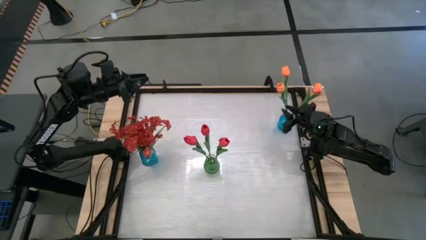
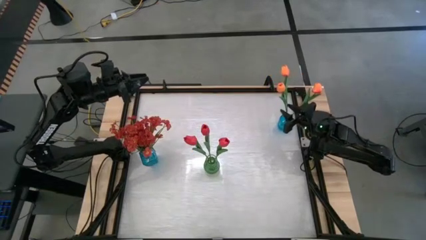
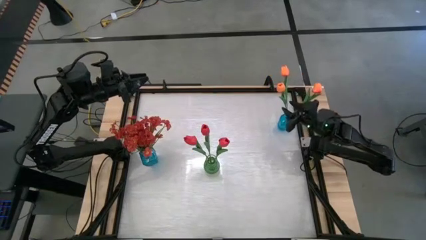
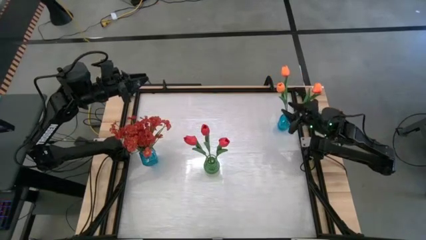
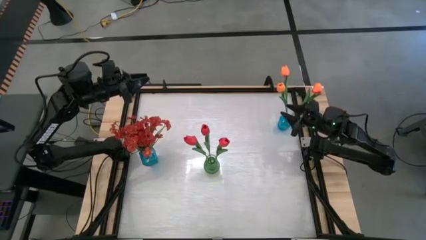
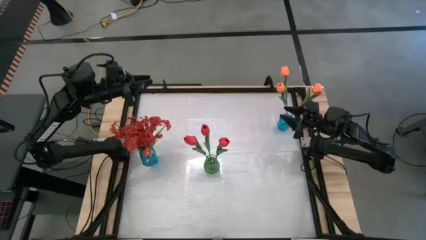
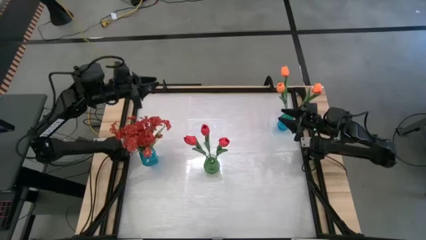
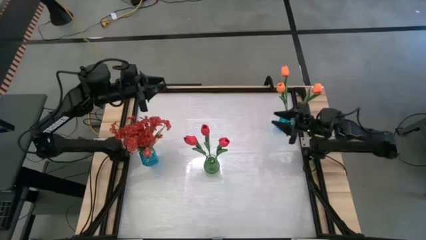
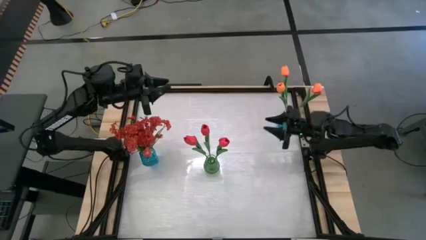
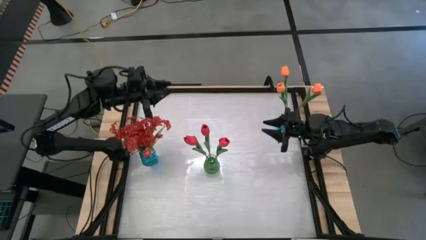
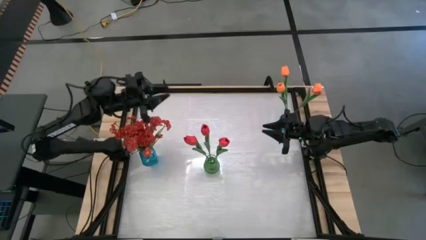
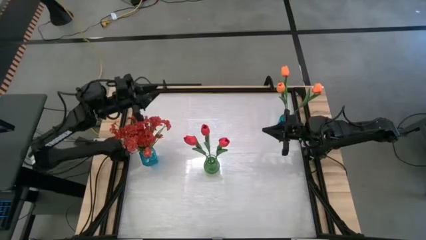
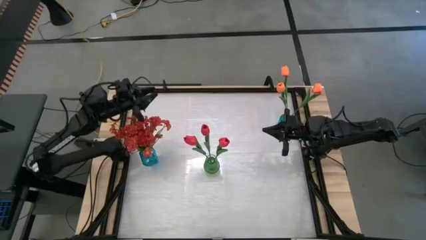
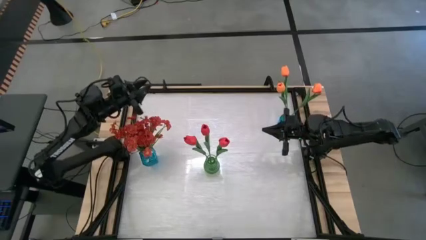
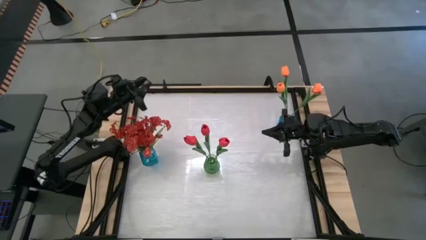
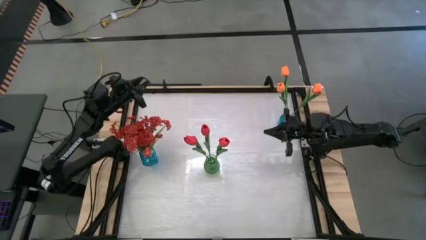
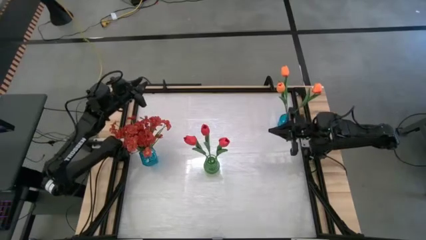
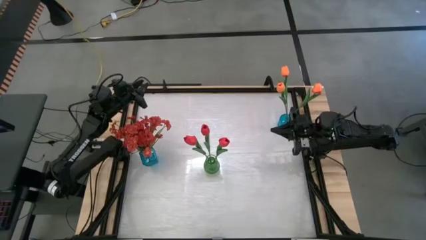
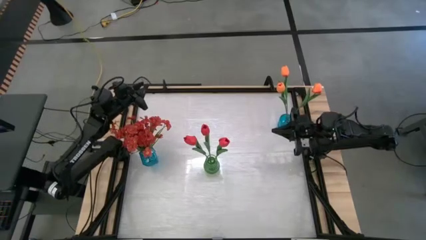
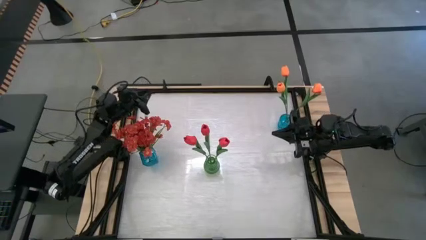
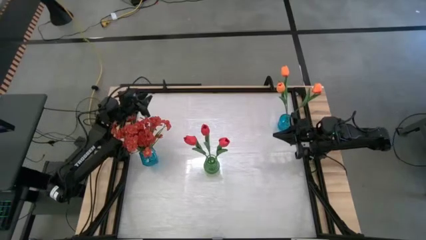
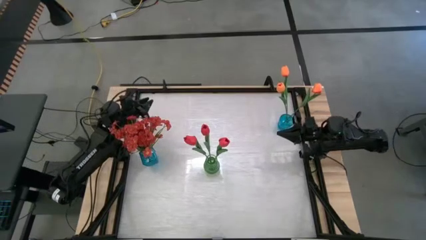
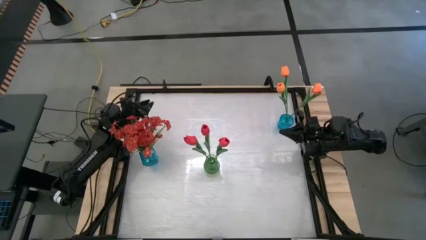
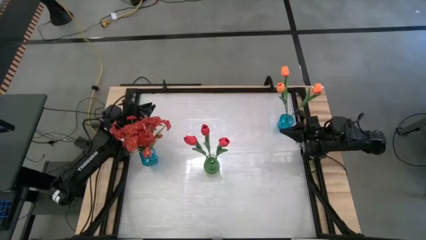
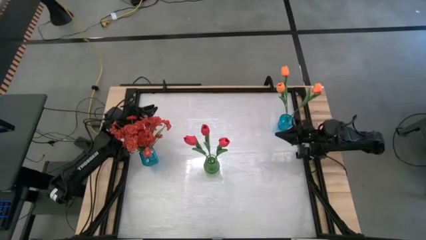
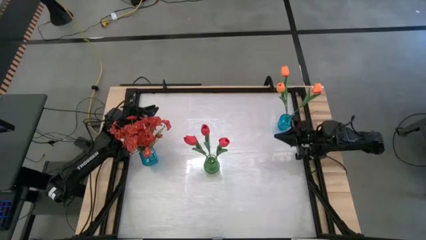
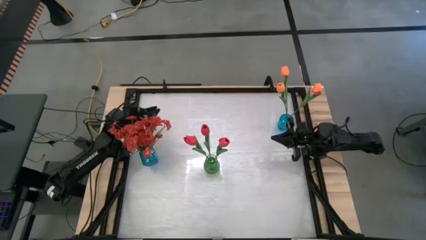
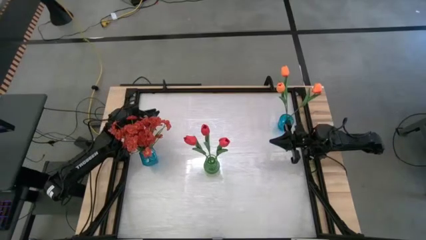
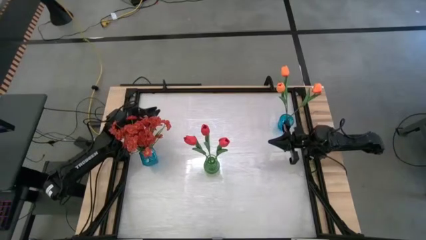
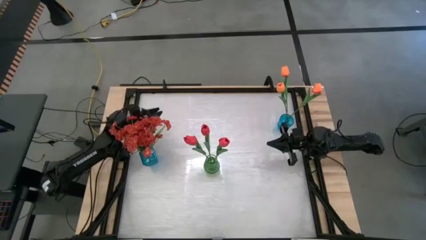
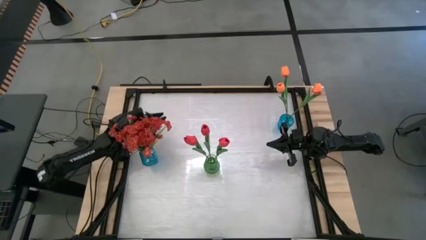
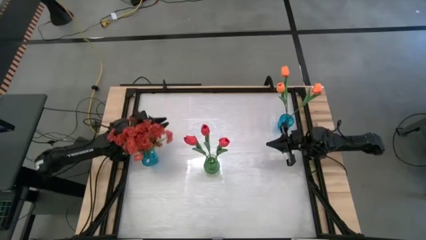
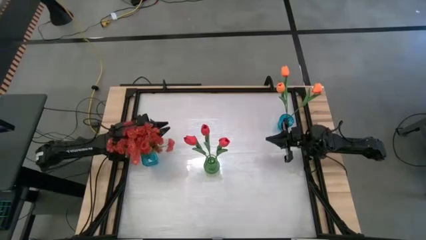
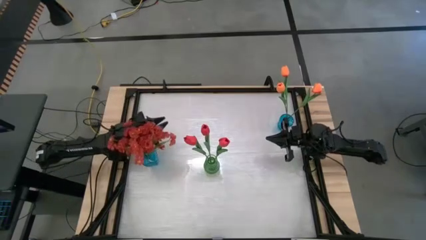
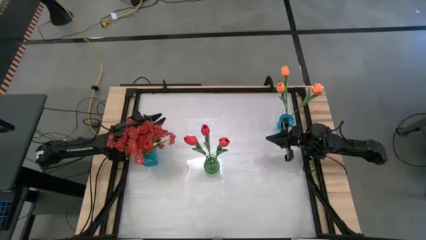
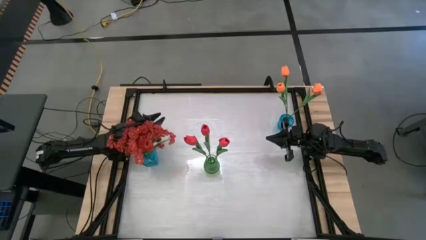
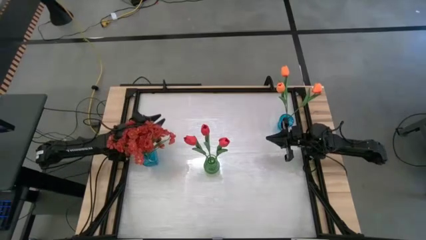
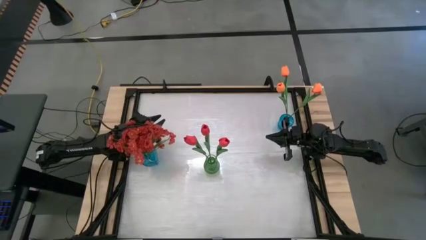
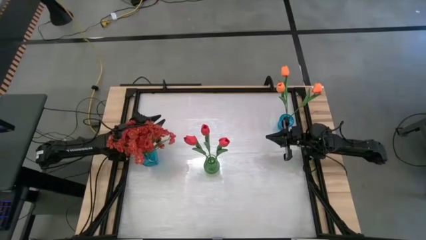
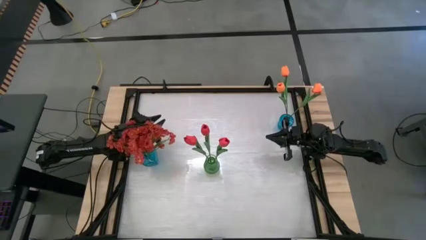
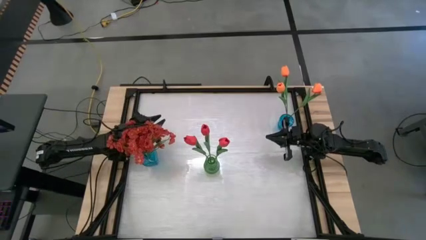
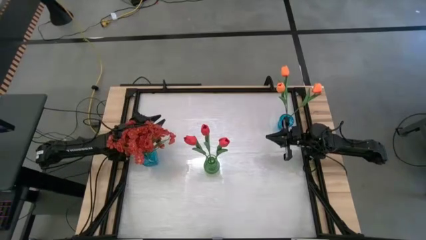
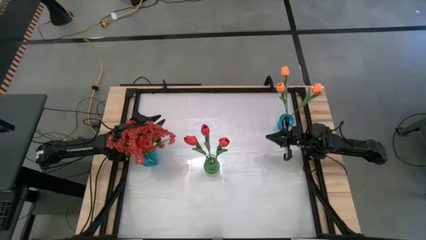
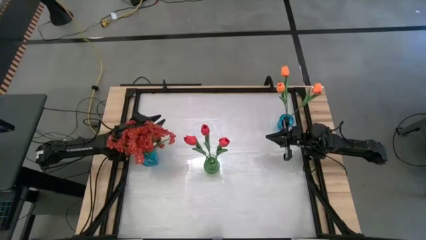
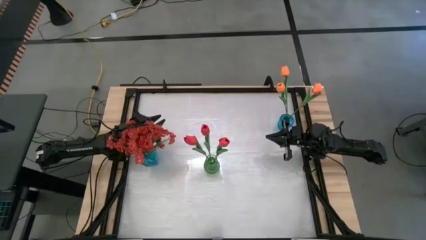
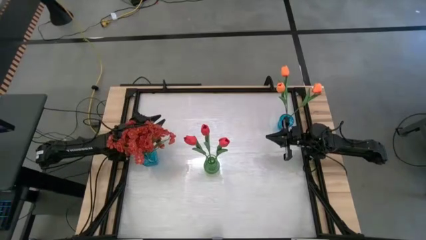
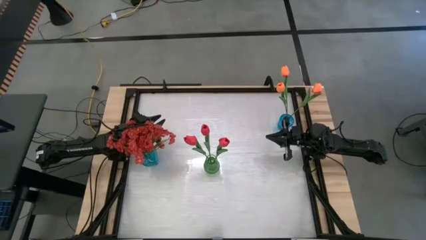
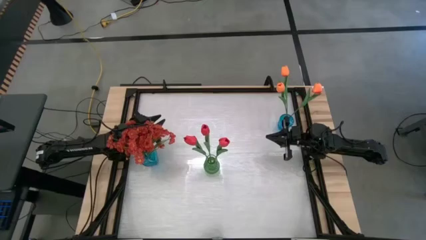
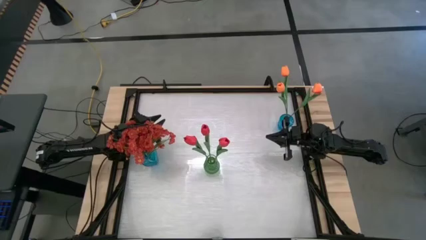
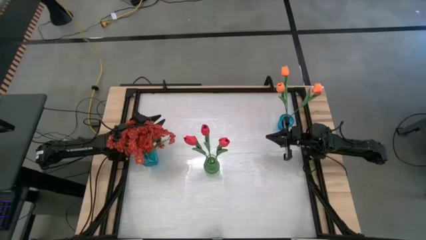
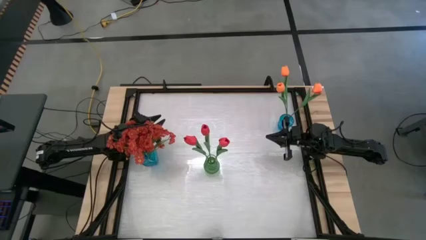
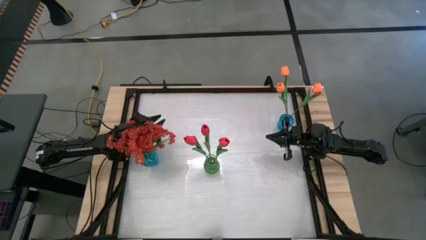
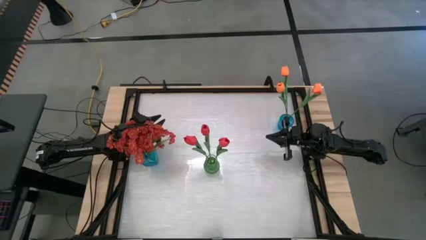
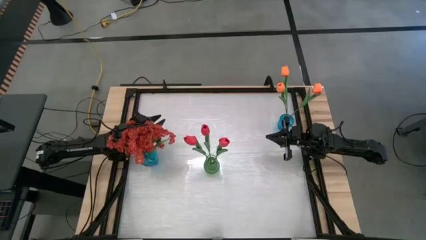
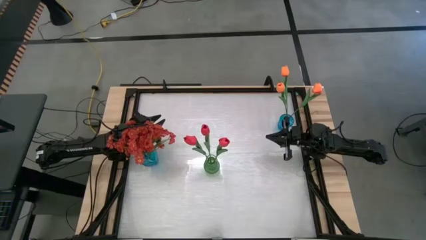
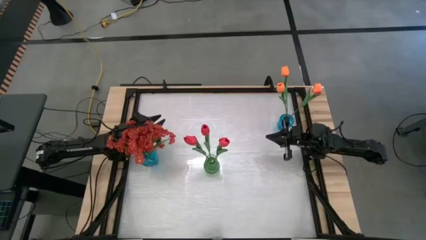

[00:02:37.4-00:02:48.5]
Task: Sort flowers into vase by color
Return to Home Position

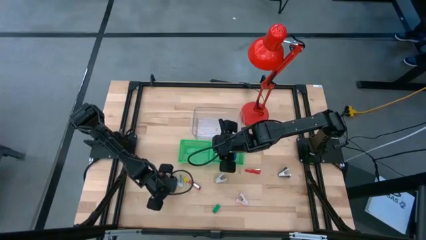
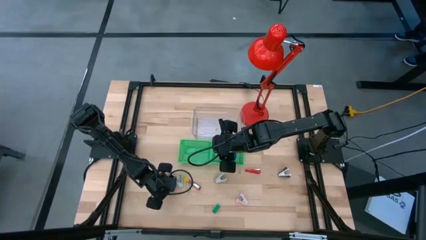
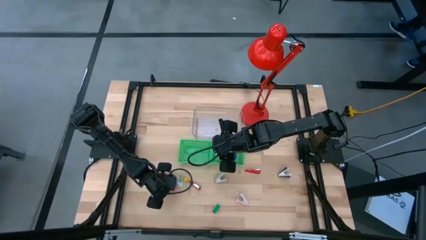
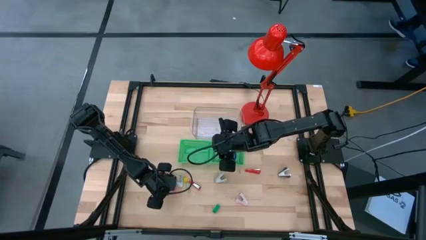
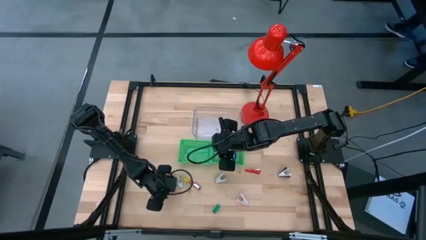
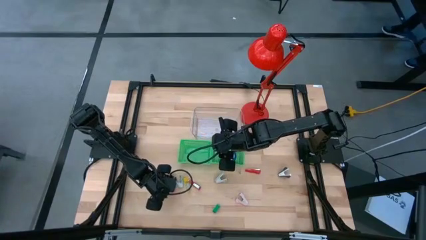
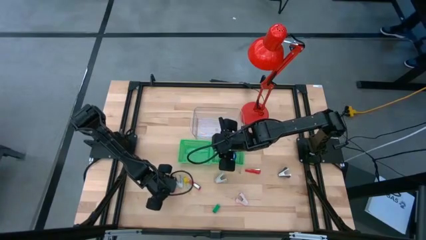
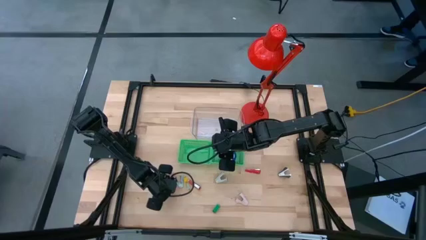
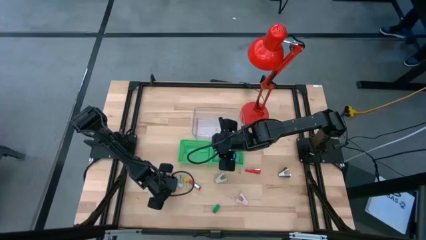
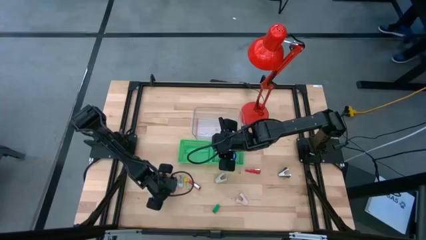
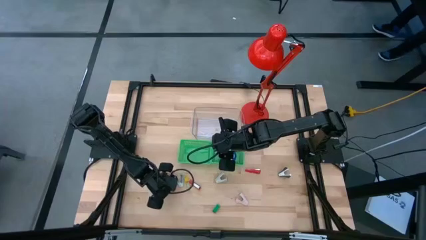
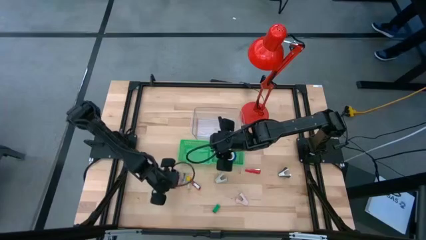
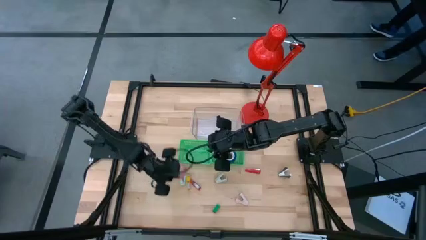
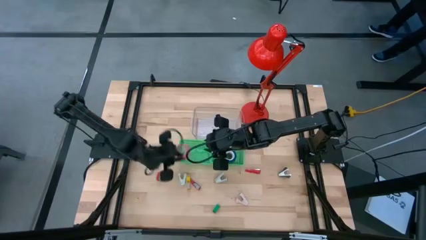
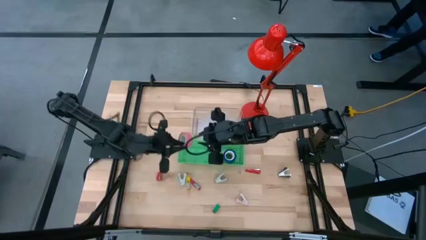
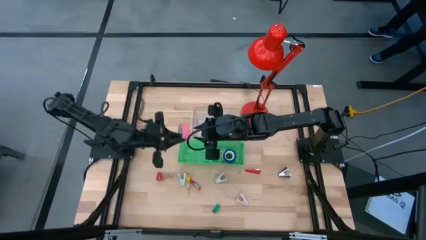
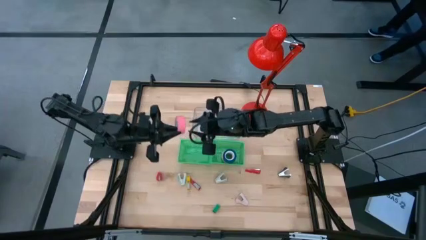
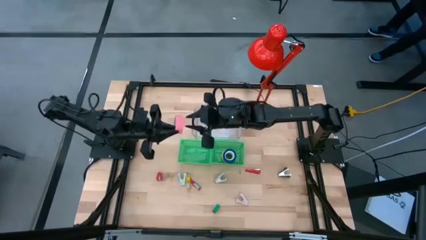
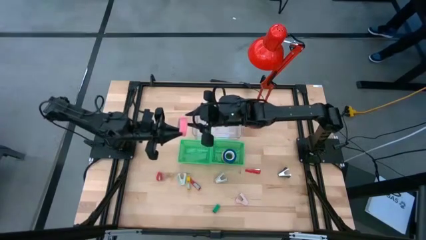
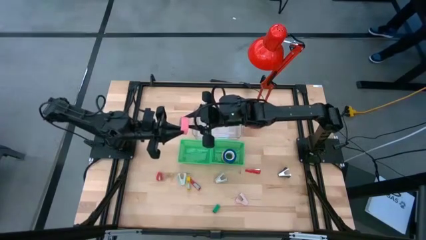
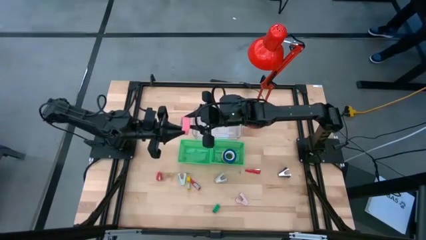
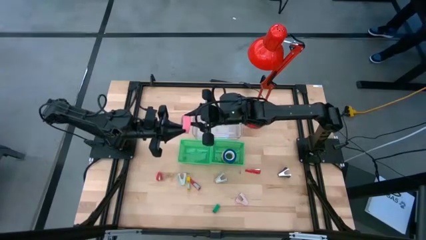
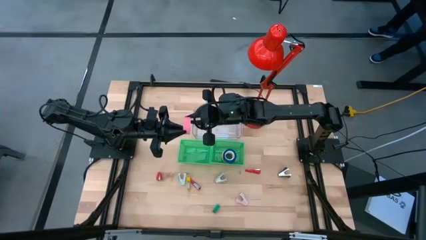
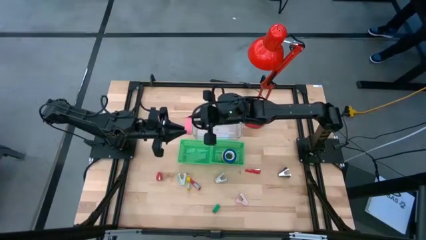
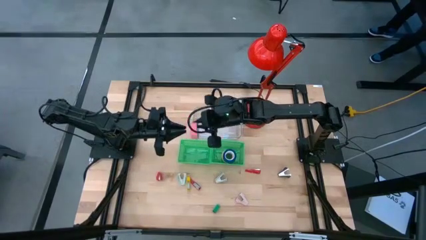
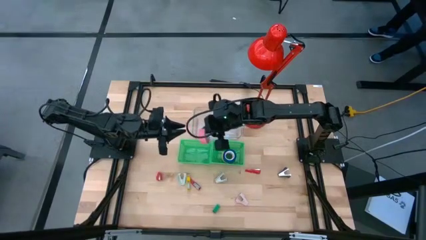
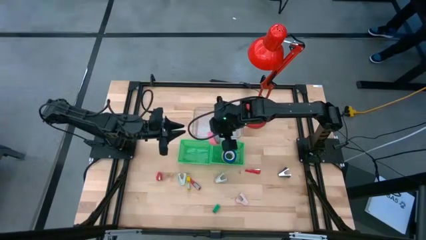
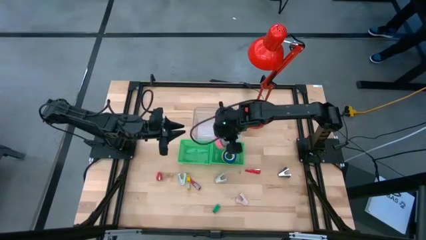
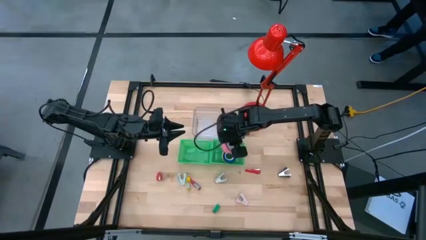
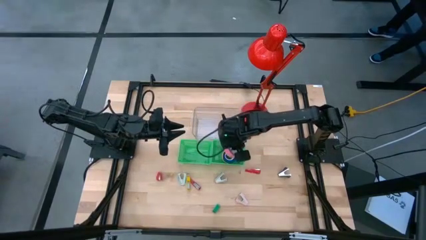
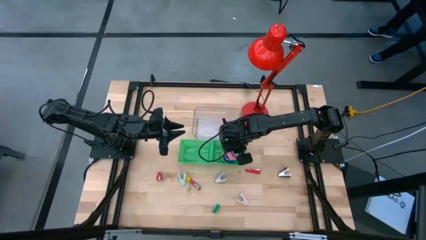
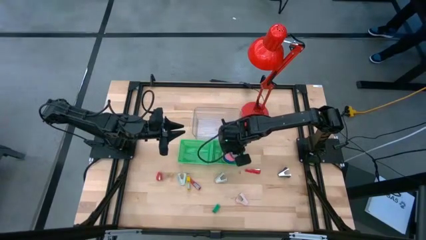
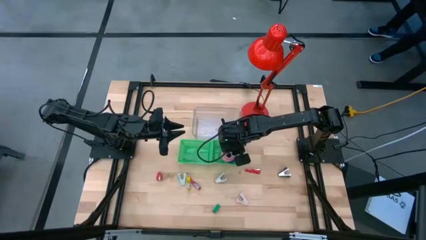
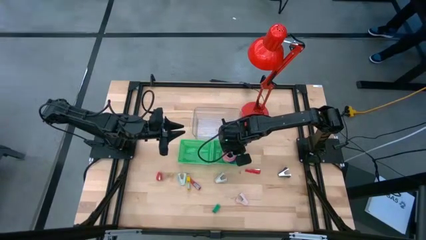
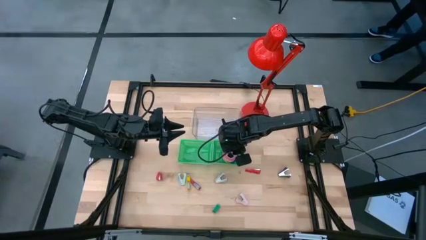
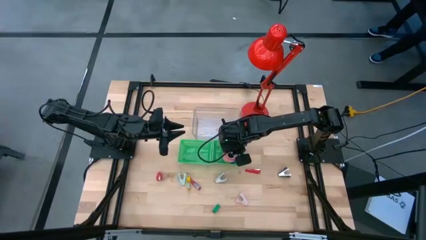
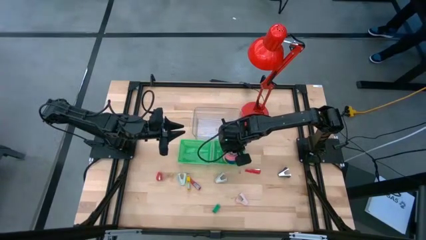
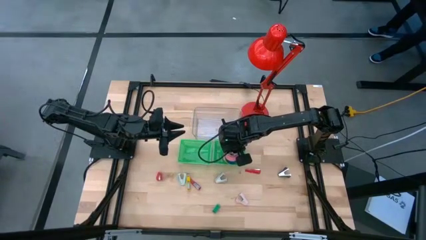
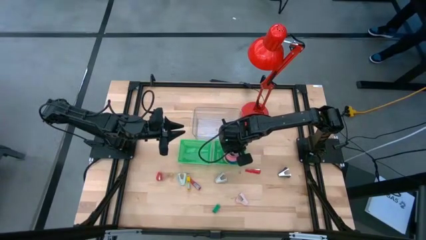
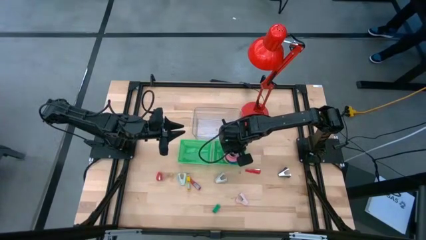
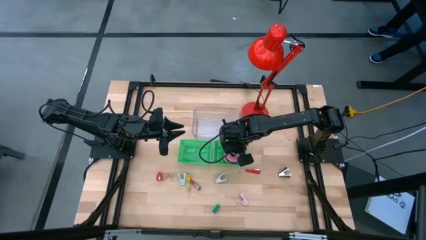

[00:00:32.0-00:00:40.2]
Task: Pick and place Stapler, Stapler remover, tape
Put the pink tape into the right green bin
